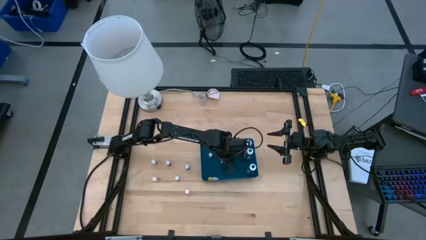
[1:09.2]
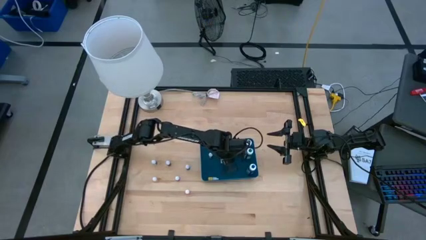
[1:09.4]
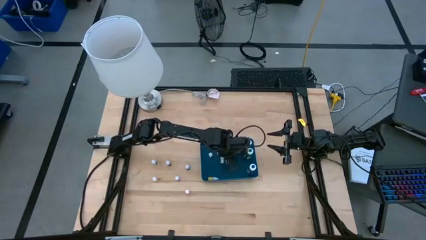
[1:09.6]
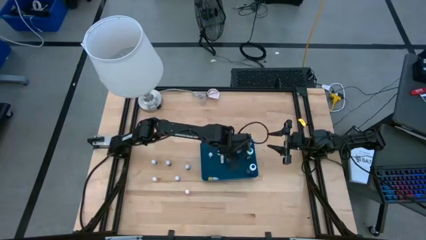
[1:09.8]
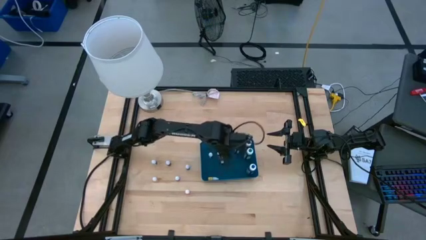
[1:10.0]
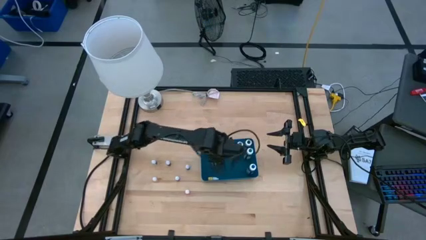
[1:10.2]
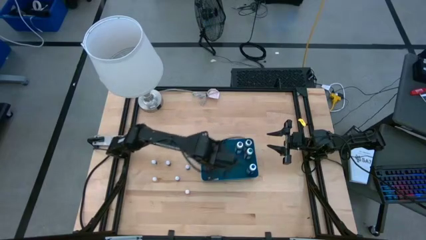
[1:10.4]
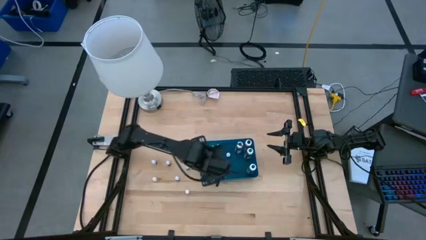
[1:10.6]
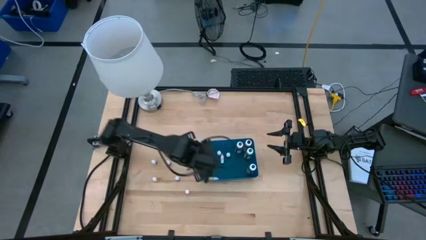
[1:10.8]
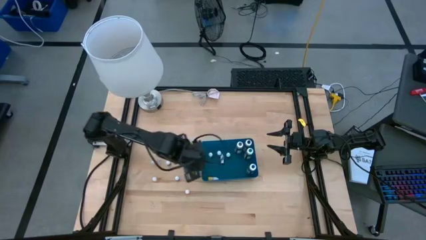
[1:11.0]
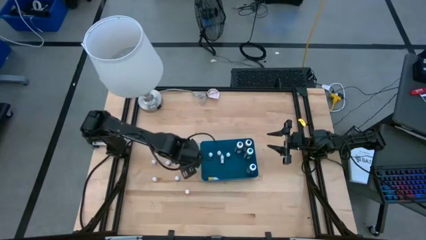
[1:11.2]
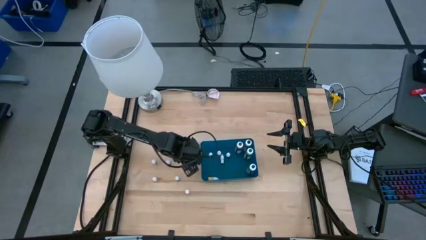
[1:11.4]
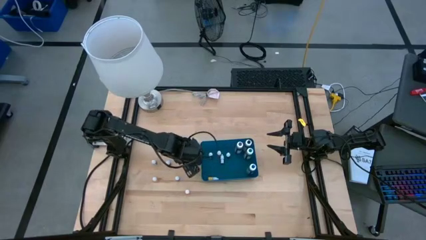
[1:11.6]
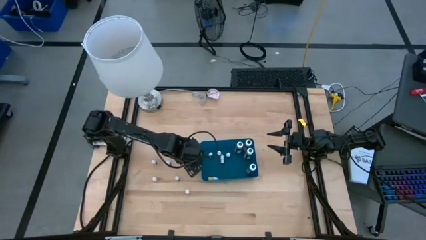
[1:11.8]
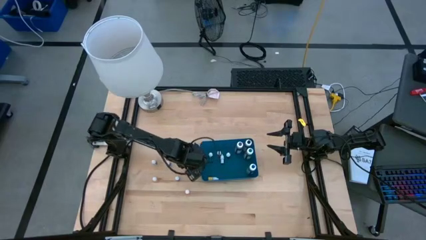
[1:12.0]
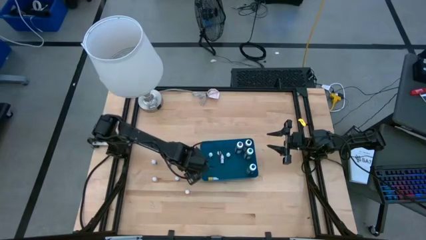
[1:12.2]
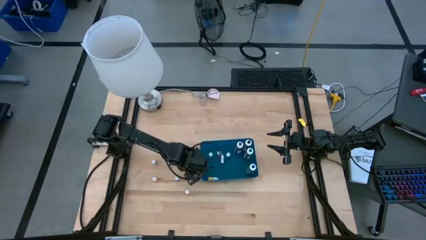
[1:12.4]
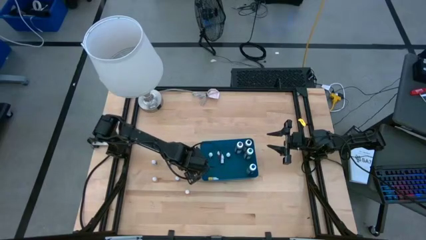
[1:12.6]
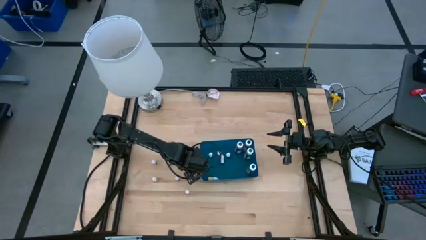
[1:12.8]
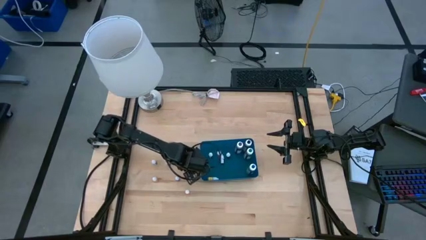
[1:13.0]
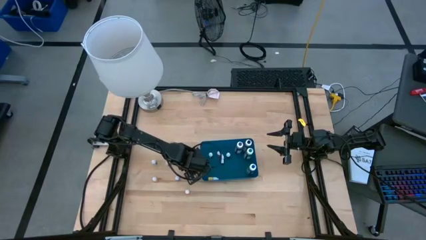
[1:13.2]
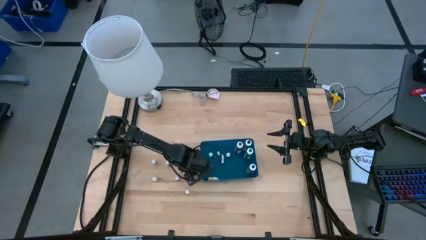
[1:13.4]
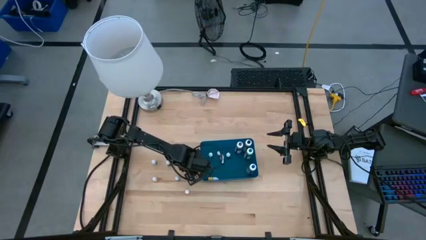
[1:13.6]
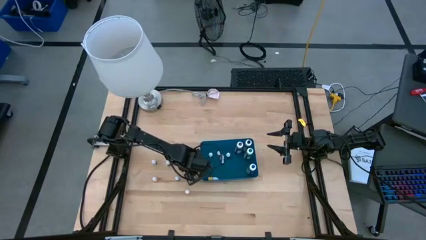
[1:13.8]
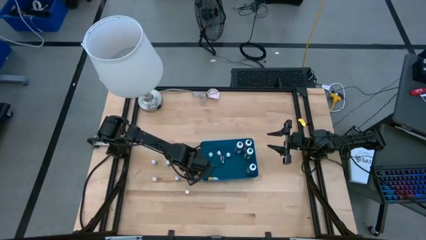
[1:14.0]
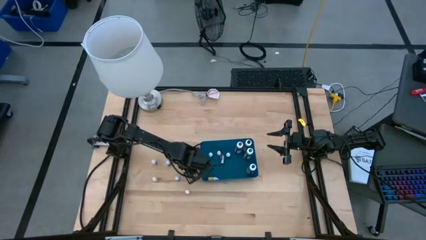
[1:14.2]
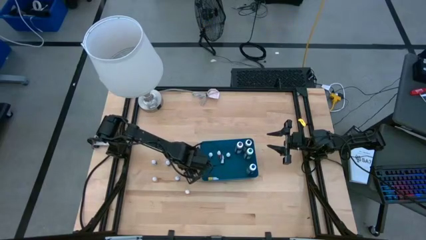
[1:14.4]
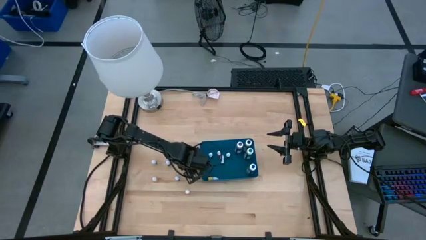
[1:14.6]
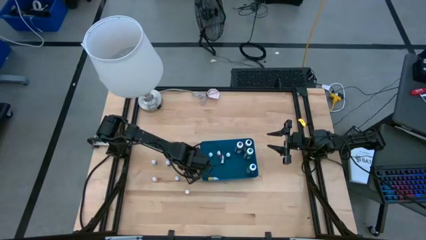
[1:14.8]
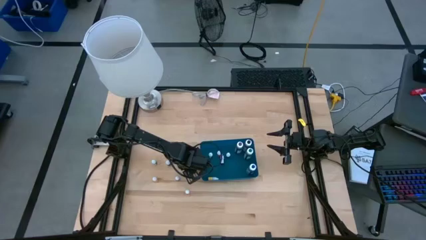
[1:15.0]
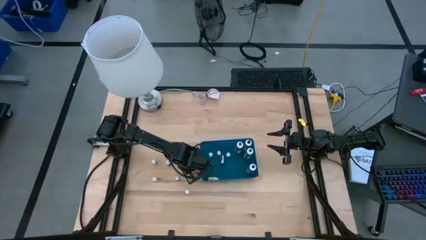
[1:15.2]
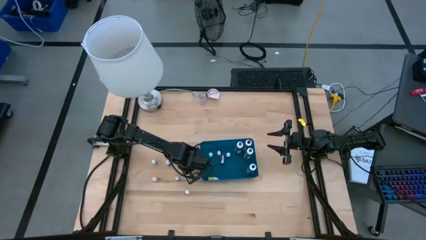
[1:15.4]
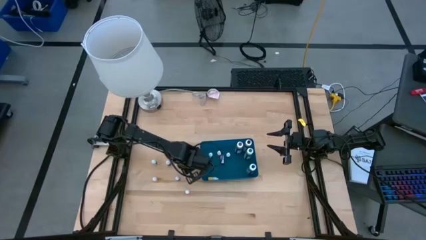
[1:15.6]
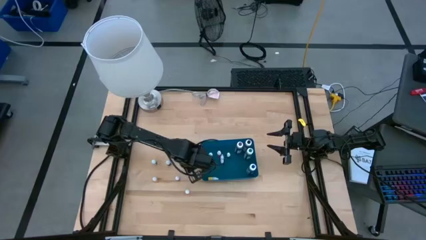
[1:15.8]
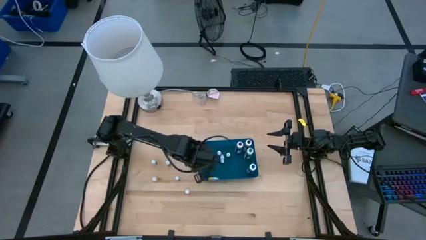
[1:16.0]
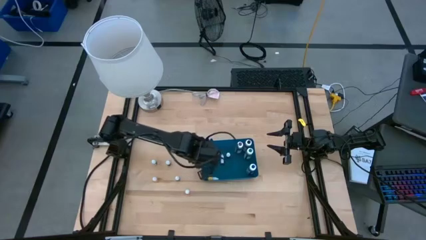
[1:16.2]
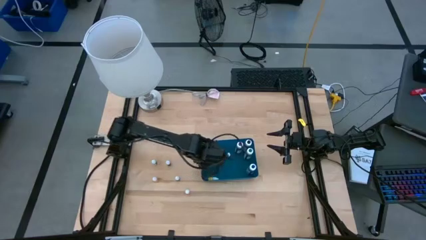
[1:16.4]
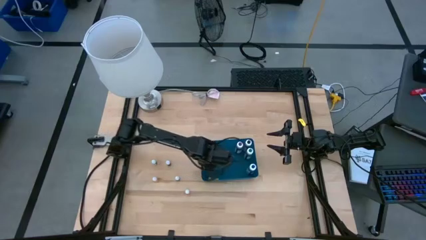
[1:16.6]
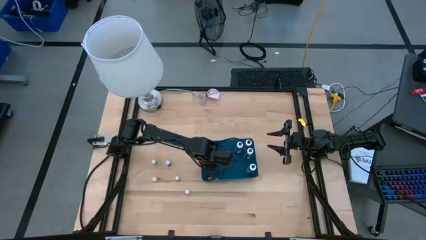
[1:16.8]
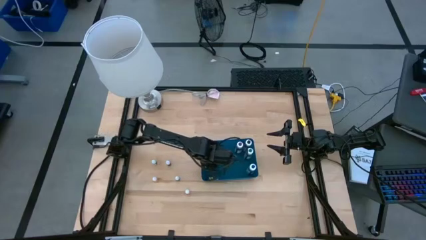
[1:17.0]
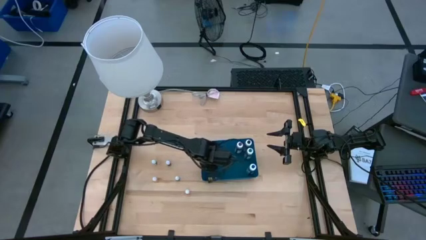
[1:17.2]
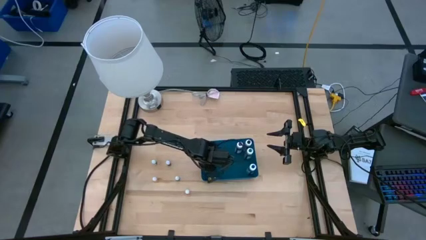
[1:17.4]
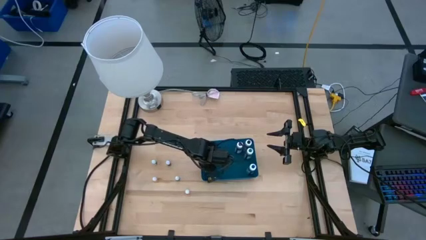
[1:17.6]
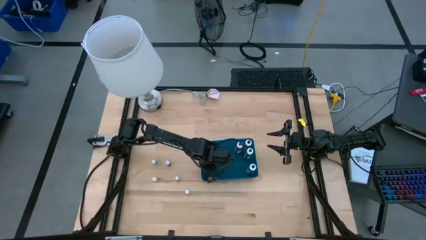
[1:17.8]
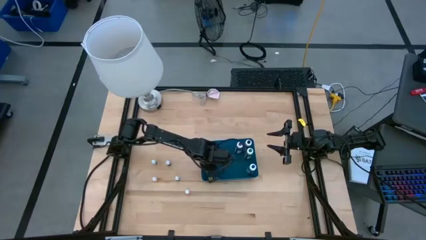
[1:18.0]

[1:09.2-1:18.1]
Task: Pick & Place food coloring
Put the small green food coloring bottle into the blue bin

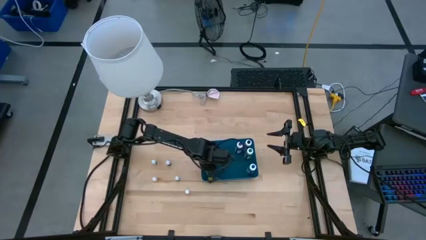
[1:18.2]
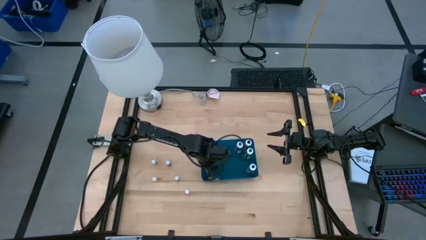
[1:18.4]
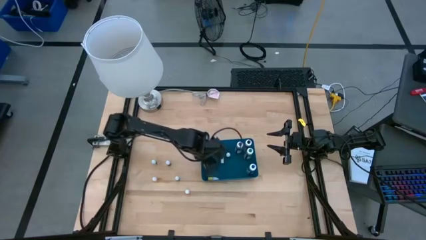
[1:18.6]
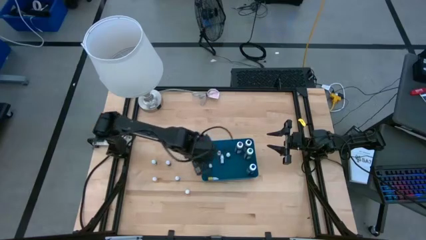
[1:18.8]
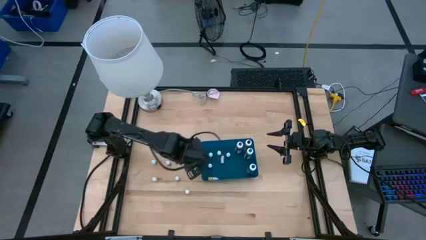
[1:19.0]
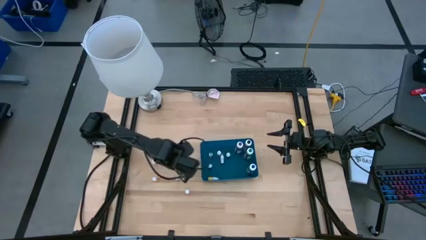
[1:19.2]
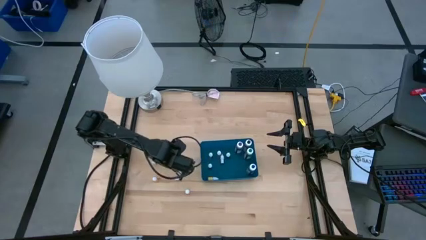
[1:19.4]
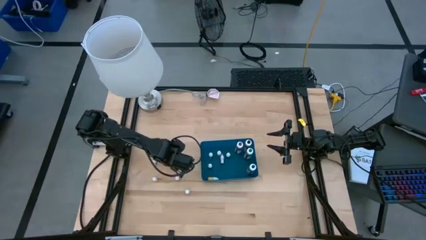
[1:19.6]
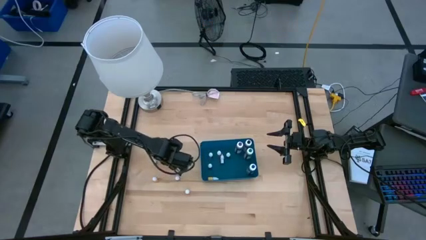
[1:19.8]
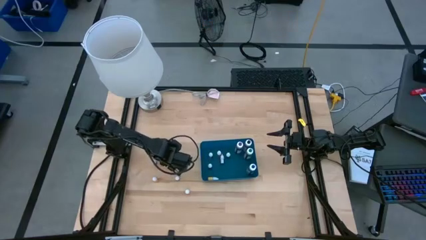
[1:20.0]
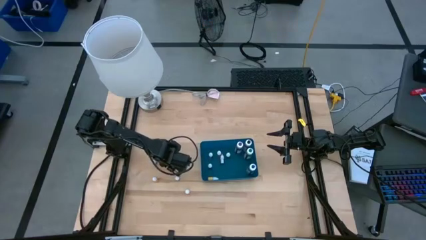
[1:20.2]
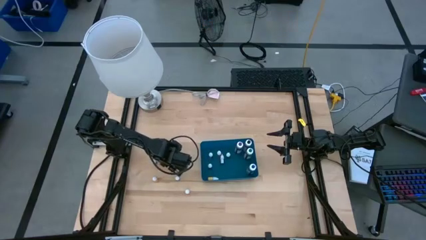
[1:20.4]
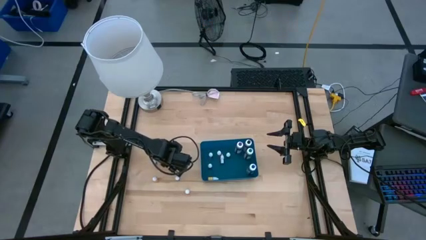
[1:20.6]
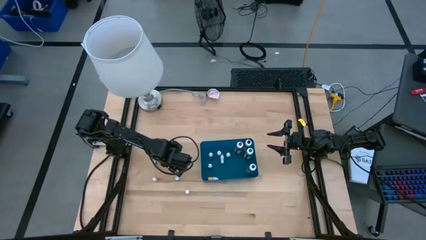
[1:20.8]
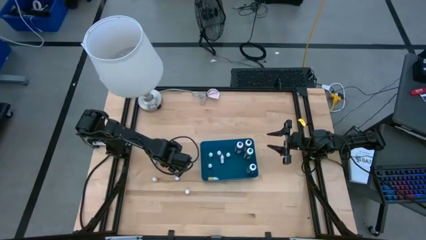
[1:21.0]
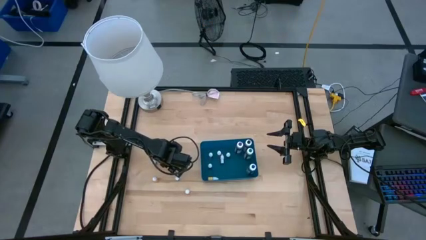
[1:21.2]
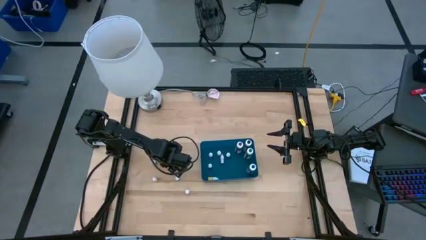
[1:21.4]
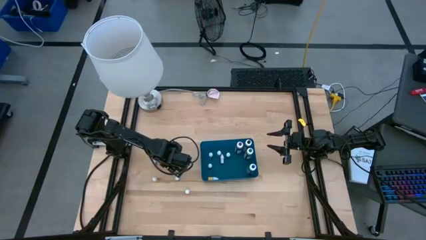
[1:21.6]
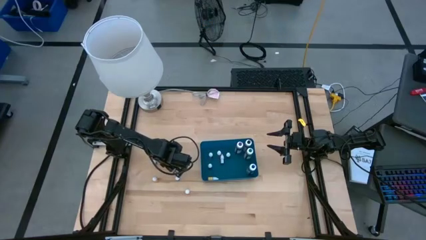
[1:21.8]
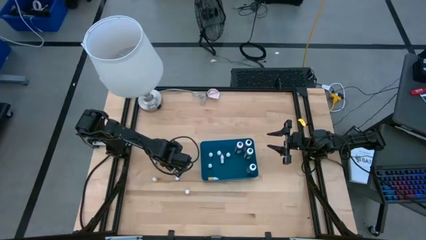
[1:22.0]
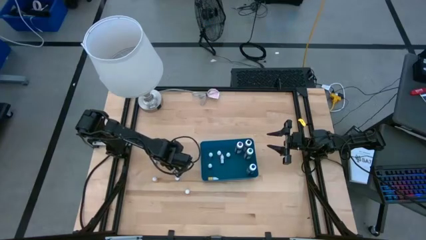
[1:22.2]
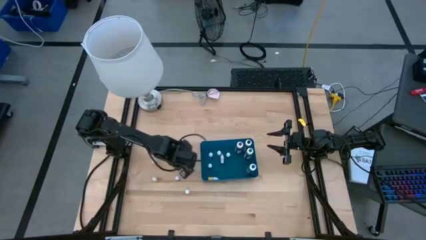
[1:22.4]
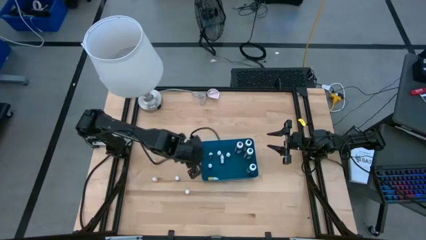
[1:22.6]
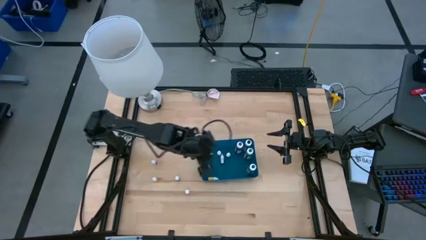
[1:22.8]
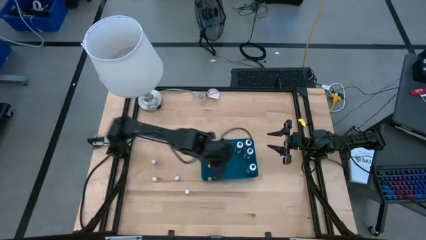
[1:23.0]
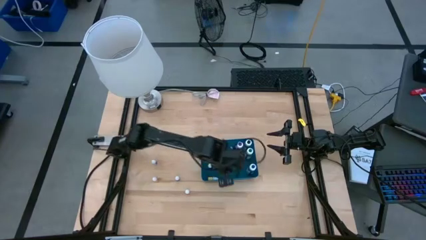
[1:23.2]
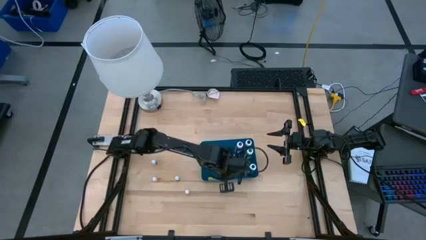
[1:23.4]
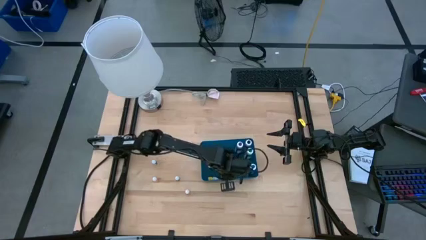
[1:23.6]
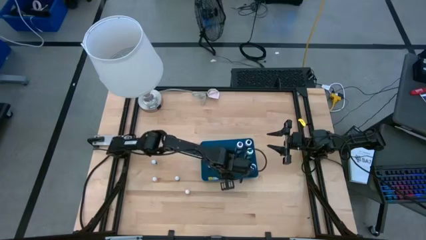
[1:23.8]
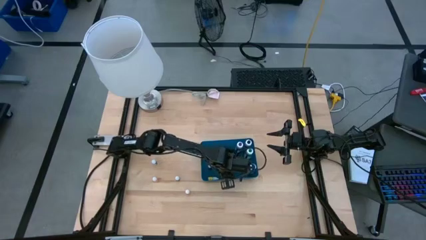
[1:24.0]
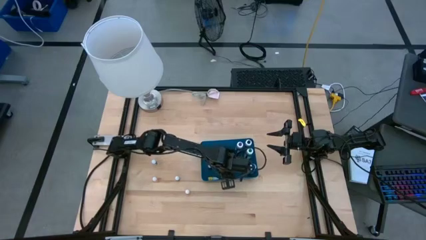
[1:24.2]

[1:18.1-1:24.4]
Put the small blue food coloring bottle into the blue bin

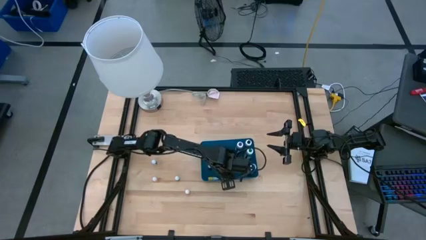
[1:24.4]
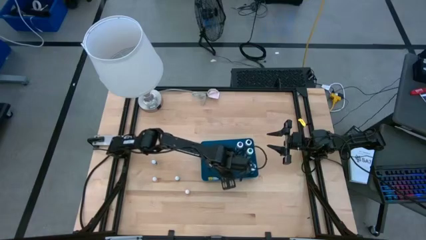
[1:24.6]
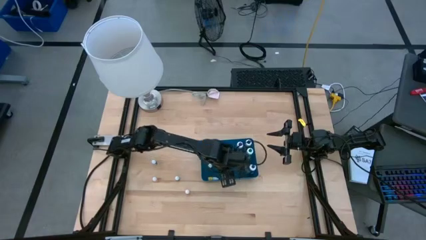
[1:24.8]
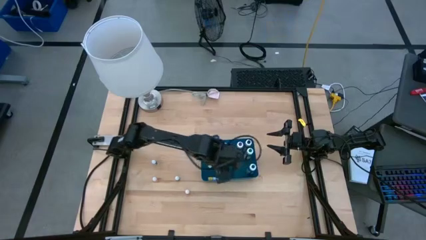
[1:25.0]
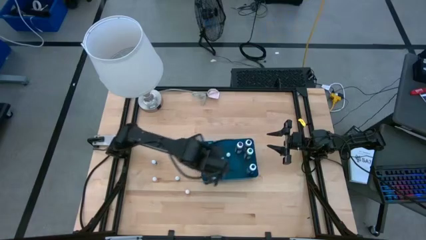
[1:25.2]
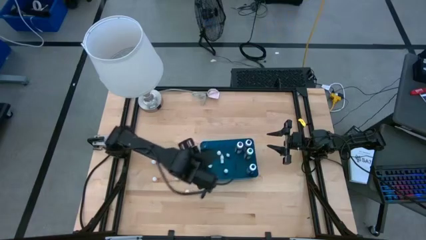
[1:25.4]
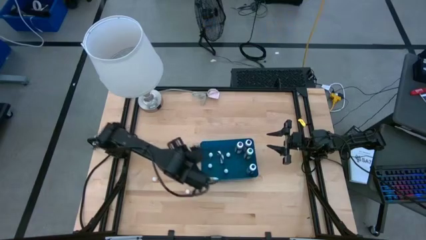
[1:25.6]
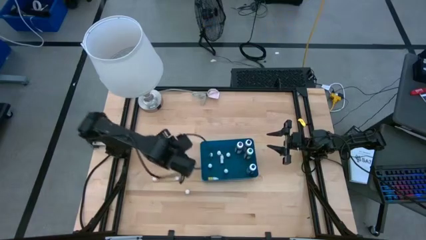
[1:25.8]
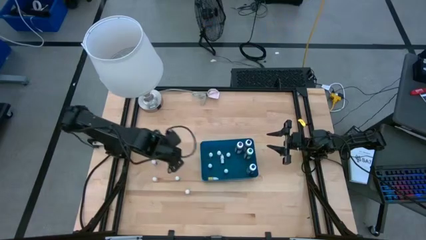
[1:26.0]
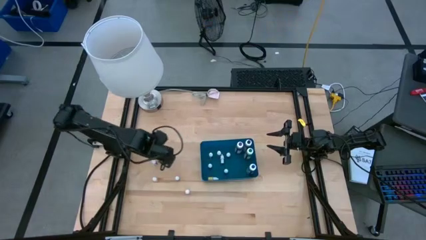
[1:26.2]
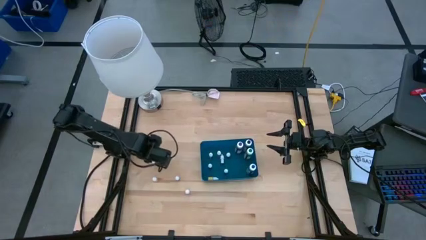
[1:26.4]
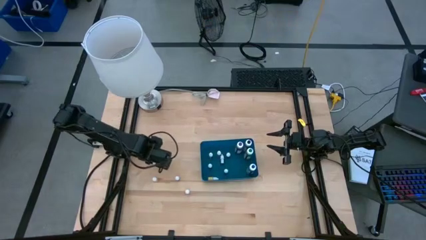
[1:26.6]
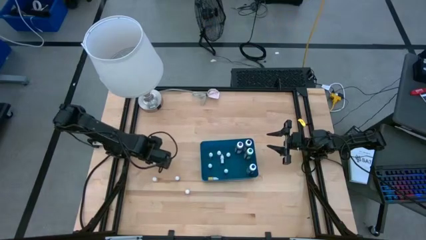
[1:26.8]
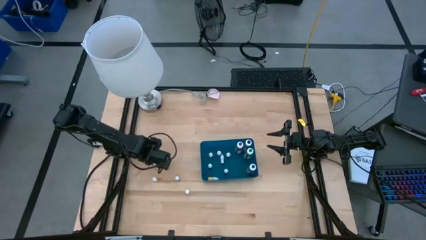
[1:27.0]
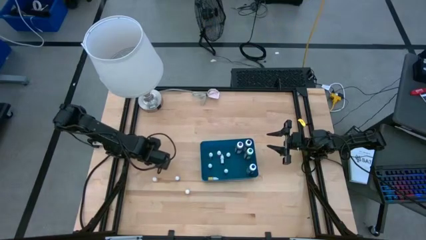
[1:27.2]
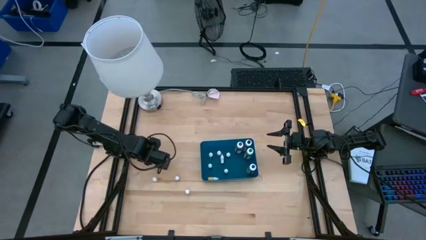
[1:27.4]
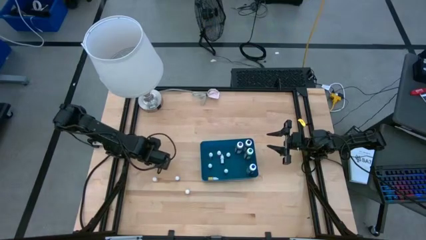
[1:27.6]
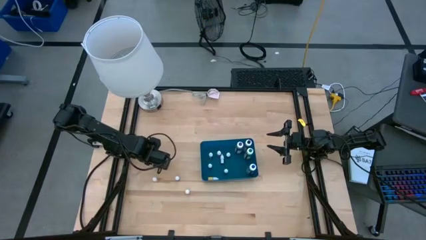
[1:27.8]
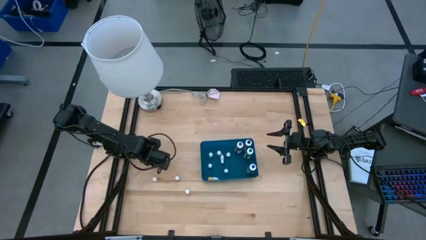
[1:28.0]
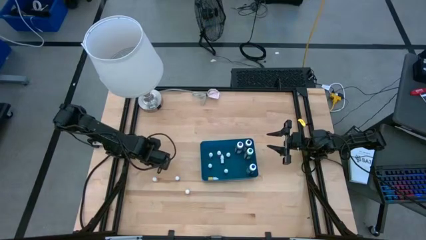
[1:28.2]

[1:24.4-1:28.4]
Put the small blue food coloring bottle into the blue bin
